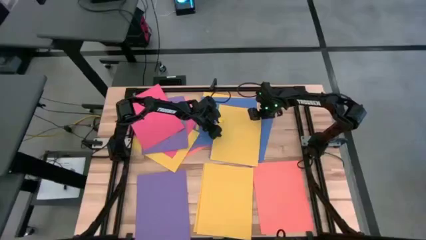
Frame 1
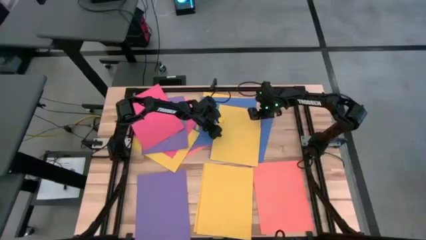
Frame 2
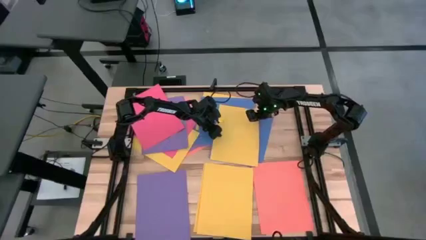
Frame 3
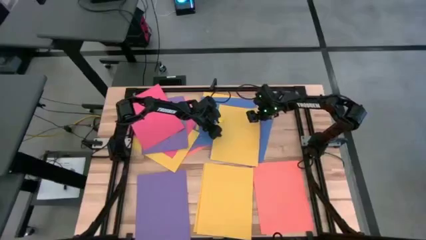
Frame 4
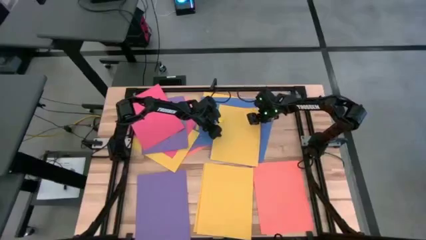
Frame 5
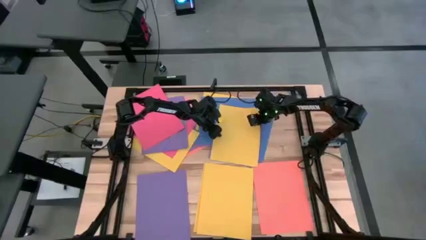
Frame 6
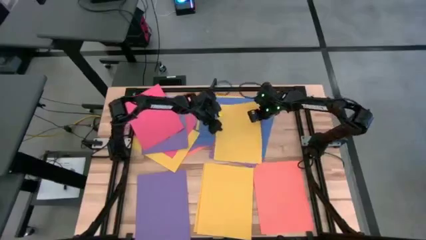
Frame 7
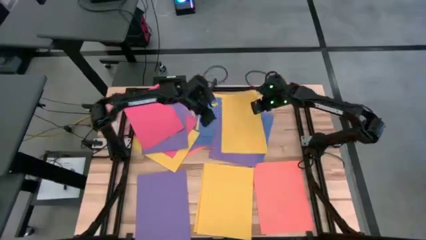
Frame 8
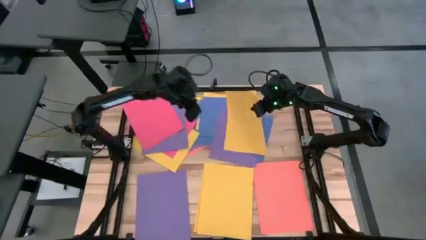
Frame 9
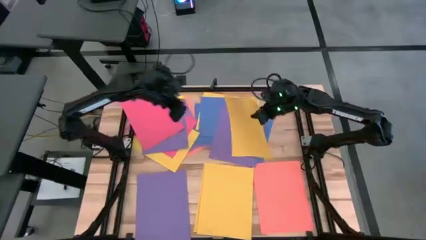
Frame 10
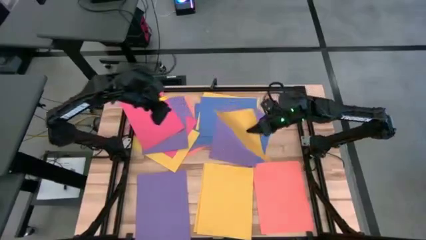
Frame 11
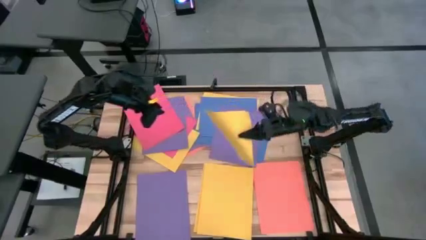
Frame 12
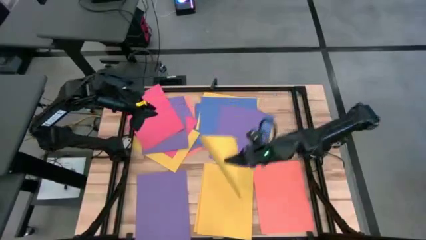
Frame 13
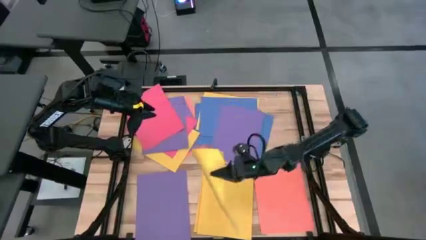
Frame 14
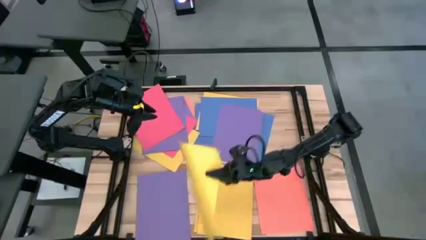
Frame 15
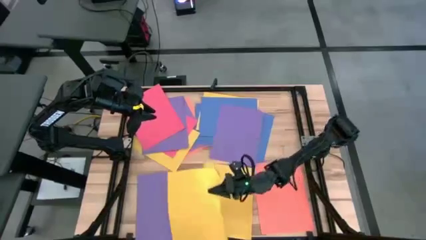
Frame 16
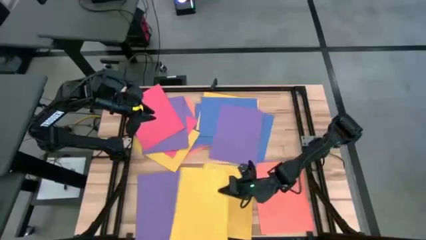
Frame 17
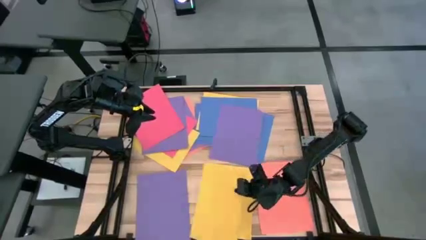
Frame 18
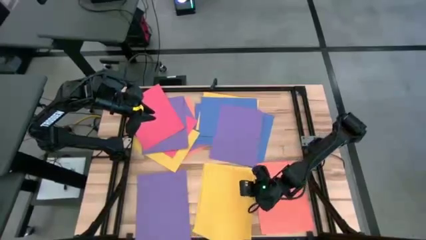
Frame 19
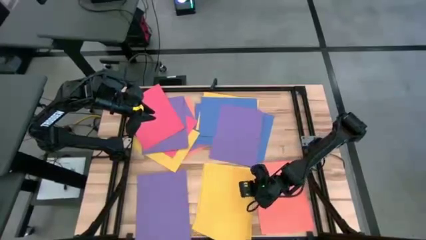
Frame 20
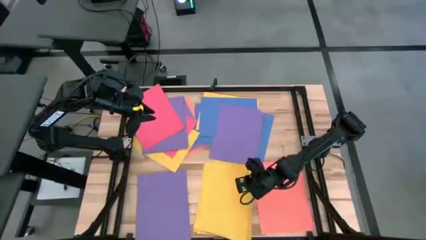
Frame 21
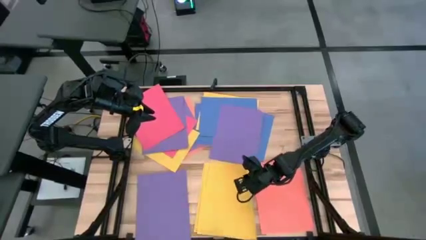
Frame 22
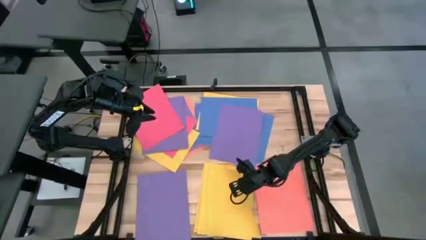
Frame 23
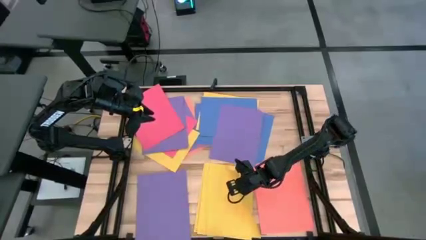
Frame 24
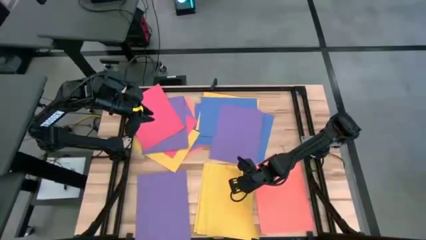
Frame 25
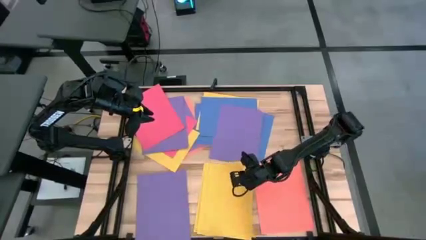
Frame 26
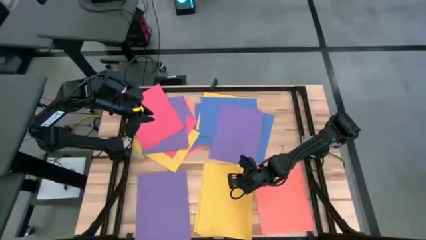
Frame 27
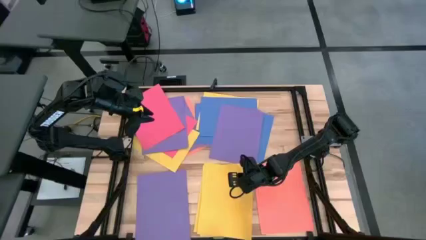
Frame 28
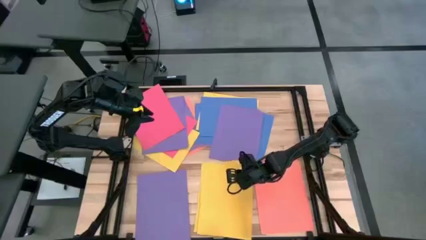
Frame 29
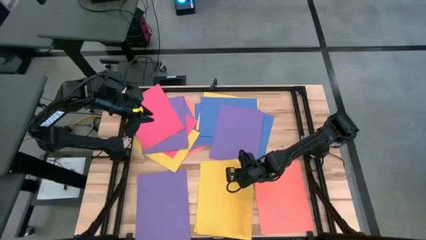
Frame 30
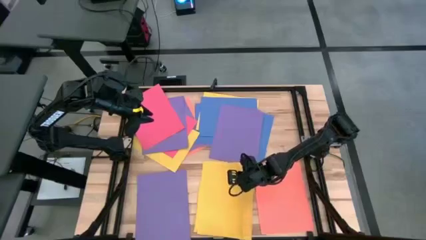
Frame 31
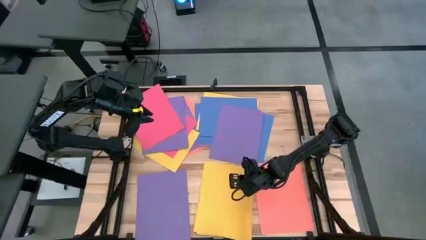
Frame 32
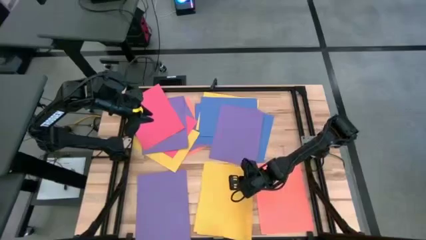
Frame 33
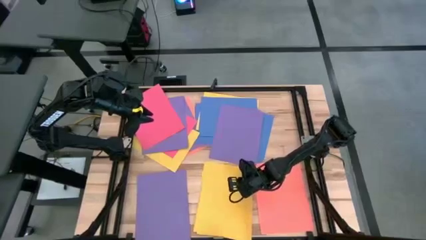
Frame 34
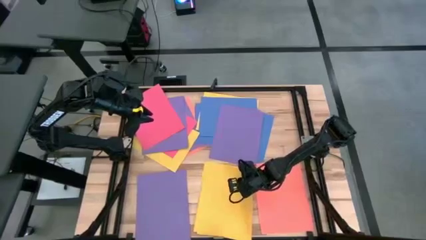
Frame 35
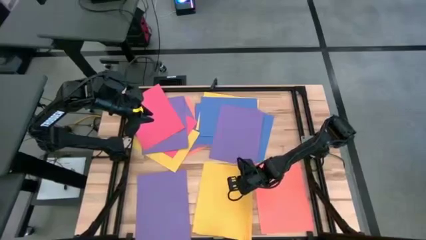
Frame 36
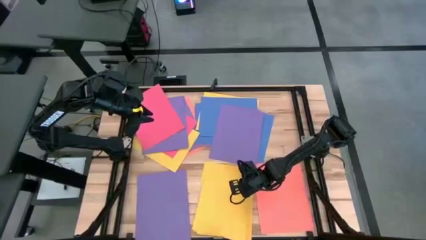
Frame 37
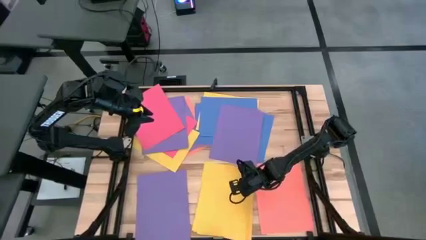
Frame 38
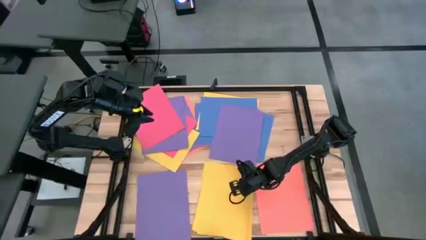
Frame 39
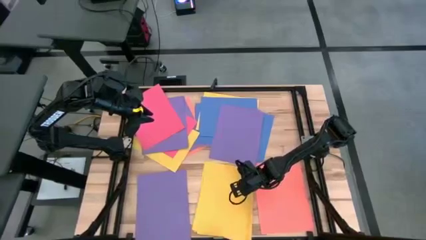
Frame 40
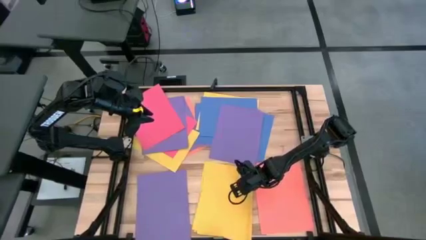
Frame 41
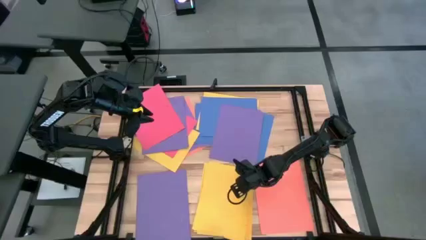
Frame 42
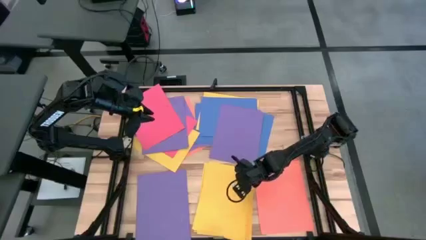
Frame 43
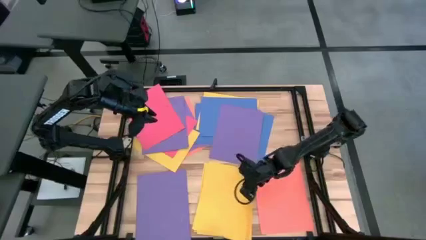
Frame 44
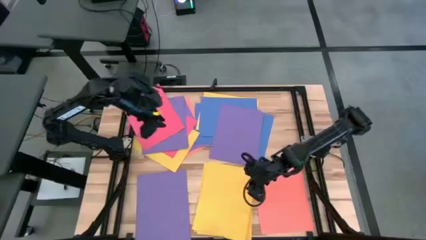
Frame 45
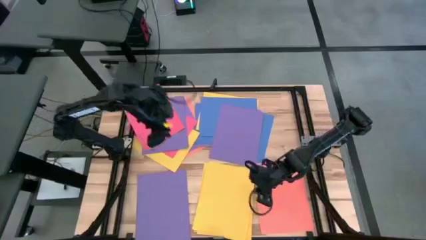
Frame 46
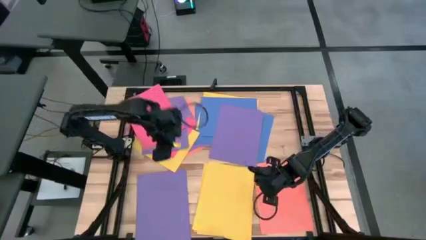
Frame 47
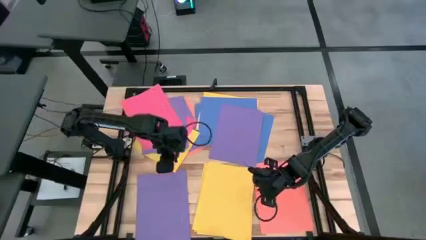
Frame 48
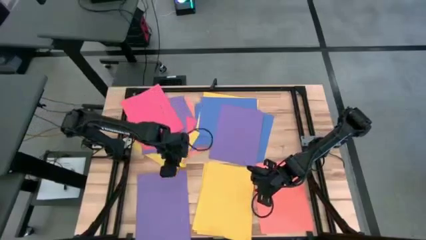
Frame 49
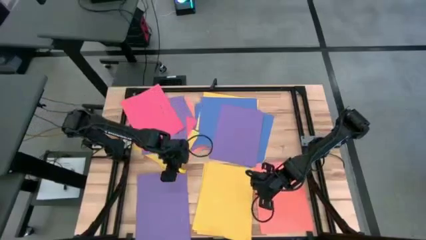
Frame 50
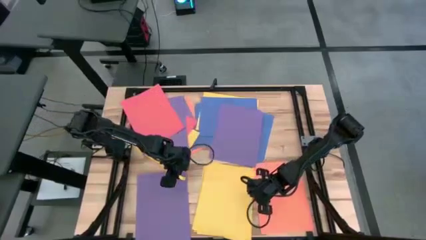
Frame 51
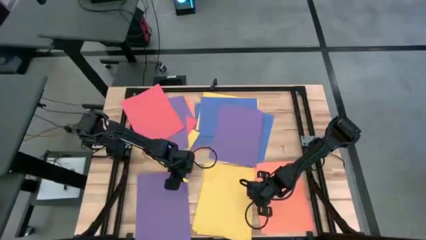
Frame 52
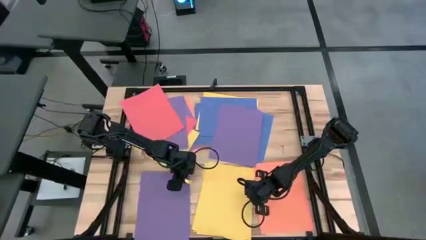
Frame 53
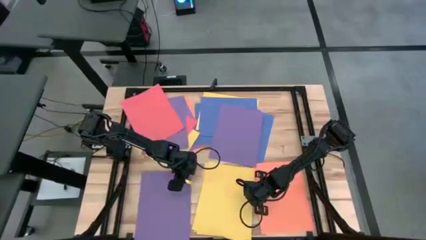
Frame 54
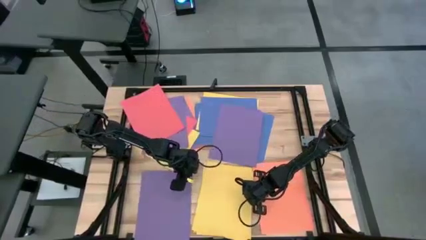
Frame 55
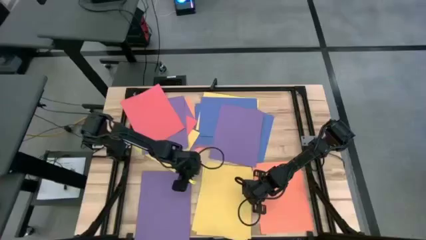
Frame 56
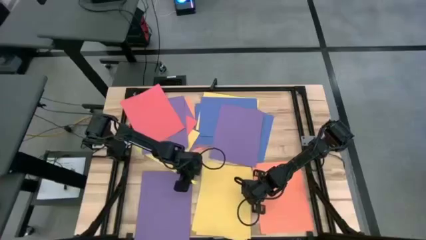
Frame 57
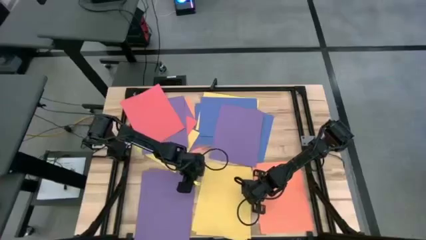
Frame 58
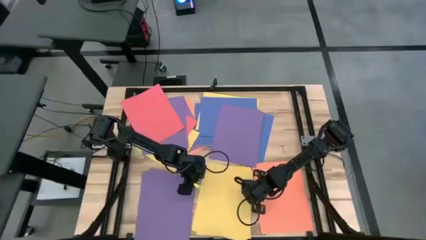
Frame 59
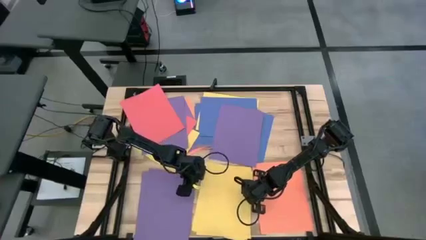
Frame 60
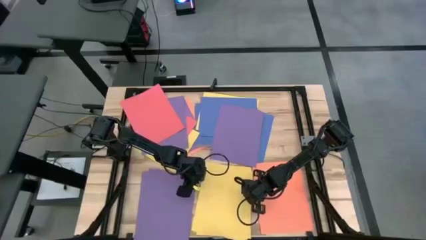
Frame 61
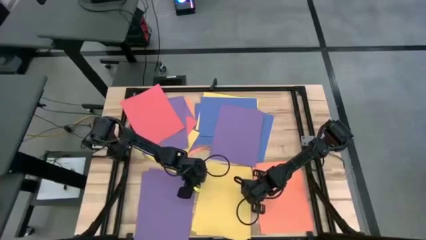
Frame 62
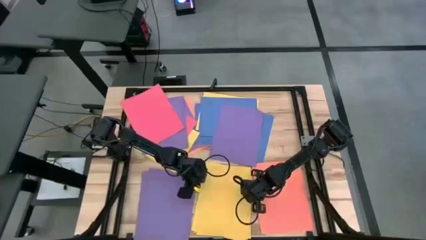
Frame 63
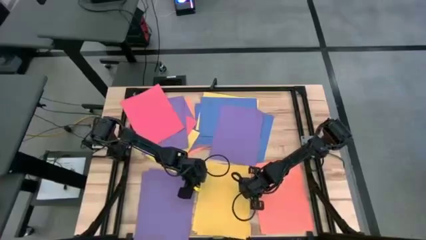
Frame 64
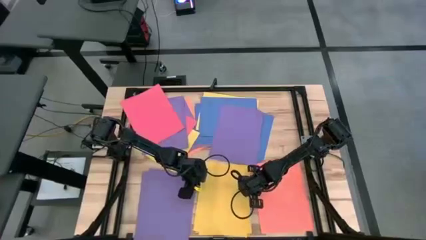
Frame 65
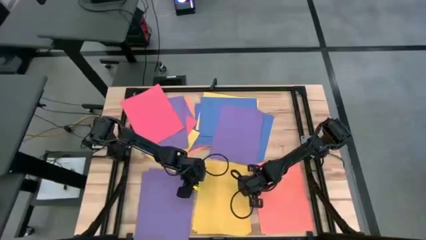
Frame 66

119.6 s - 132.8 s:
Task: Organize paper
Stack the yellow paper on top of the yellow paper
